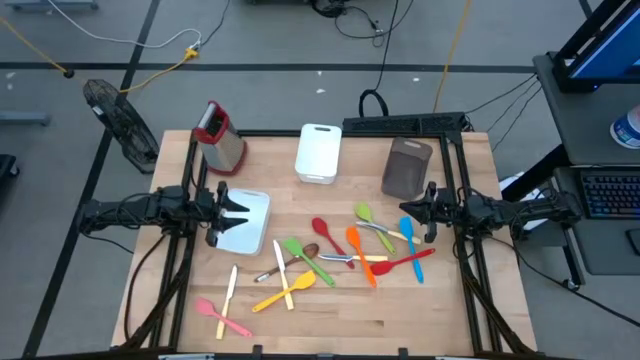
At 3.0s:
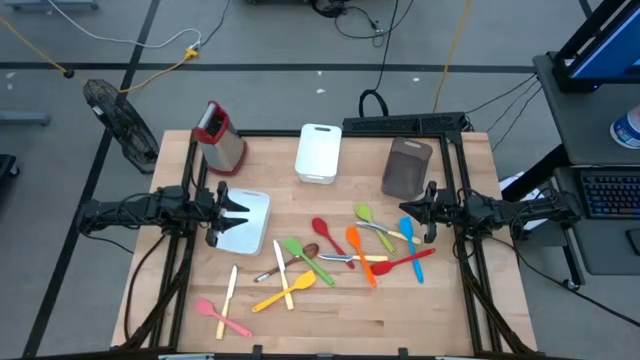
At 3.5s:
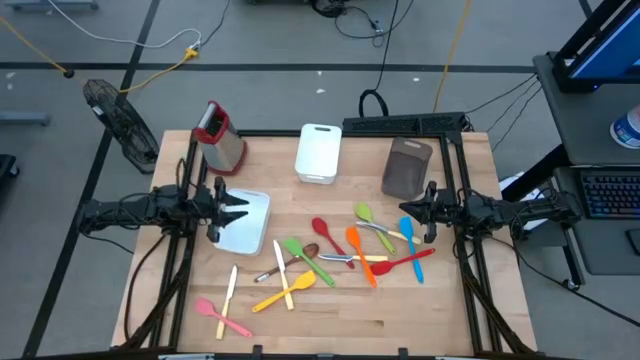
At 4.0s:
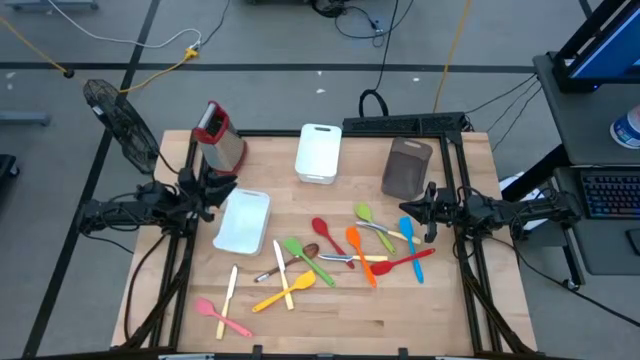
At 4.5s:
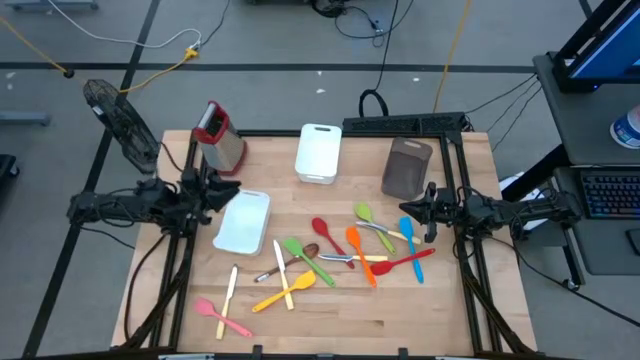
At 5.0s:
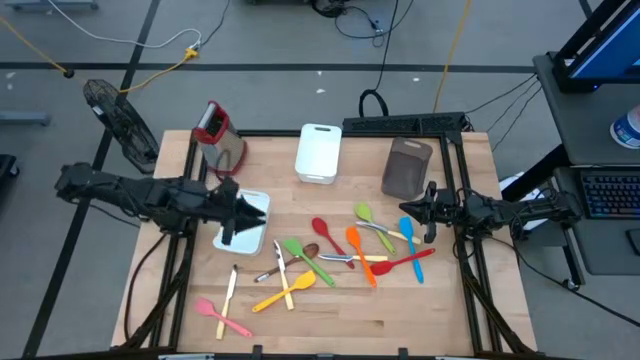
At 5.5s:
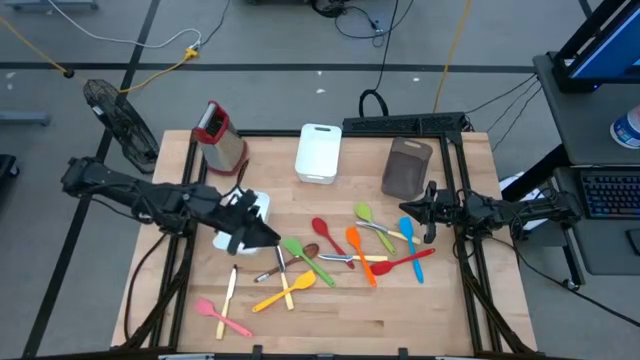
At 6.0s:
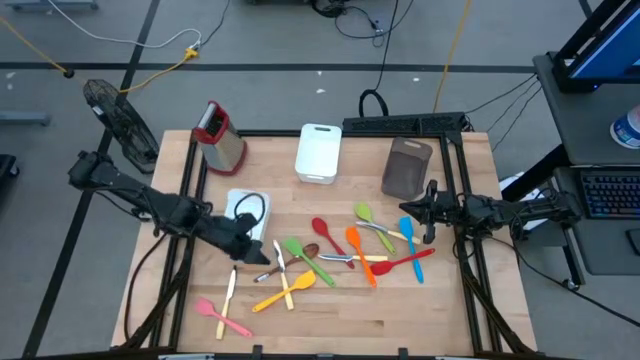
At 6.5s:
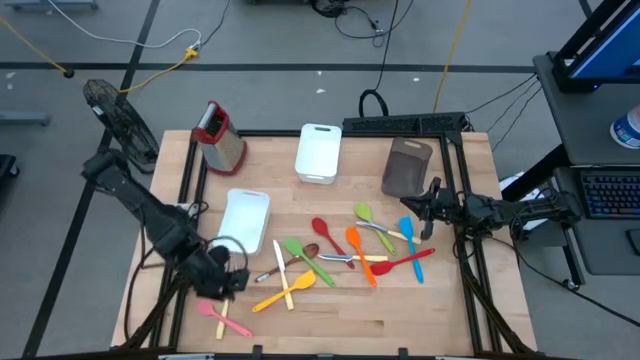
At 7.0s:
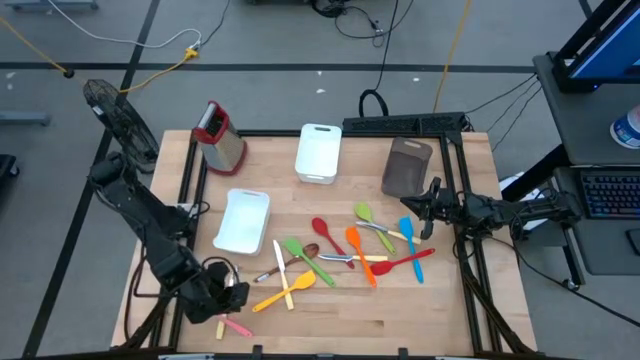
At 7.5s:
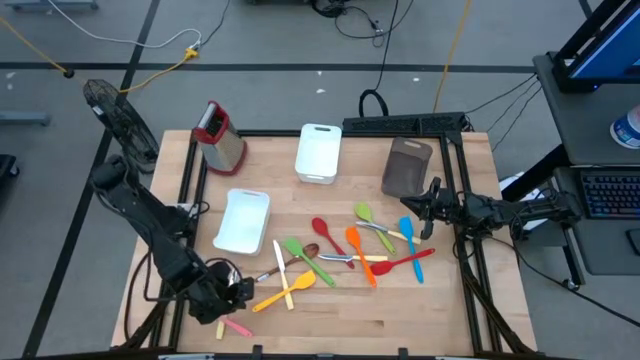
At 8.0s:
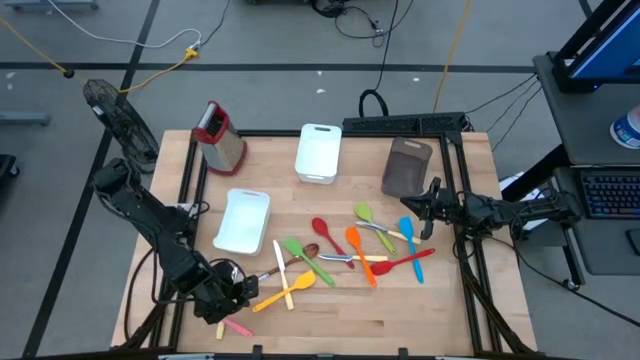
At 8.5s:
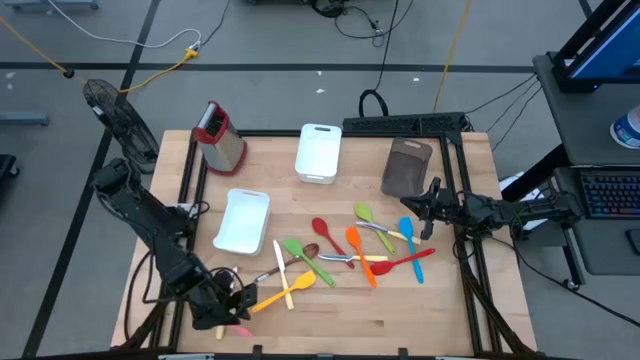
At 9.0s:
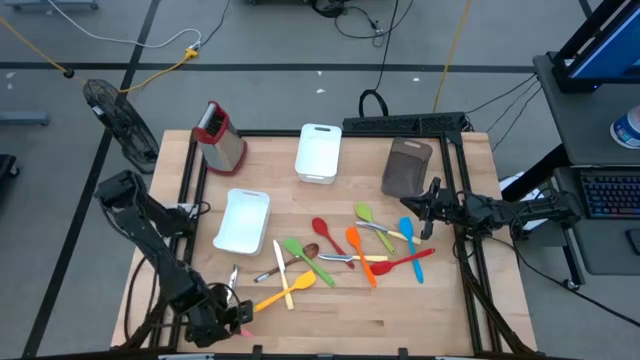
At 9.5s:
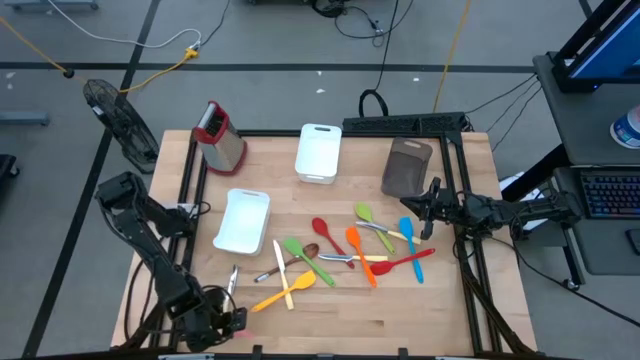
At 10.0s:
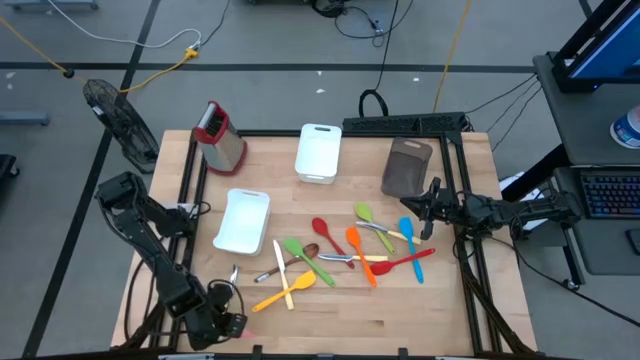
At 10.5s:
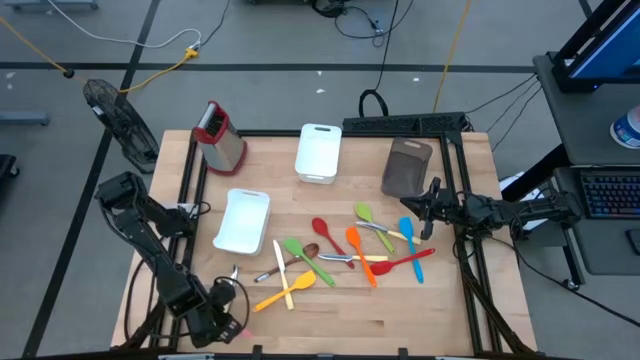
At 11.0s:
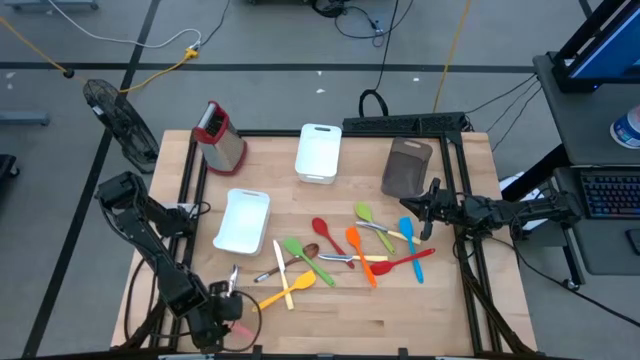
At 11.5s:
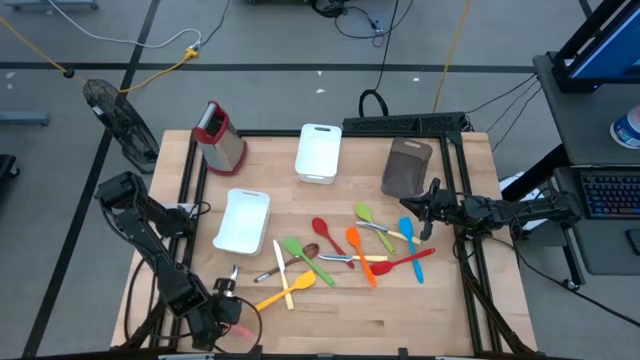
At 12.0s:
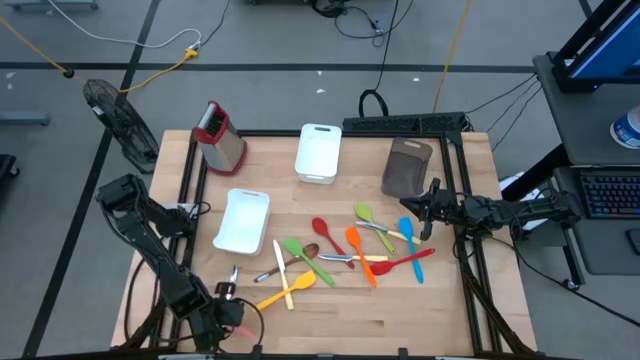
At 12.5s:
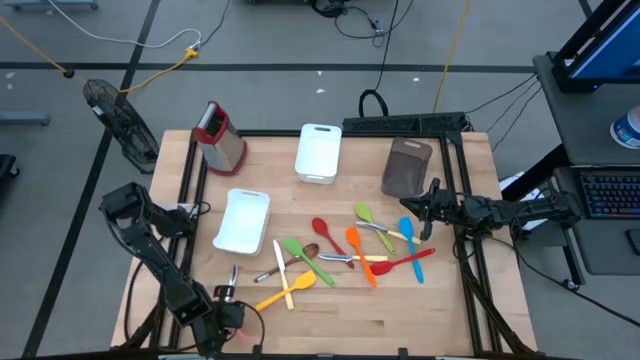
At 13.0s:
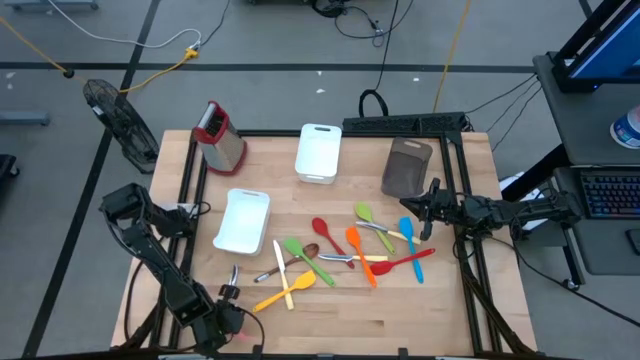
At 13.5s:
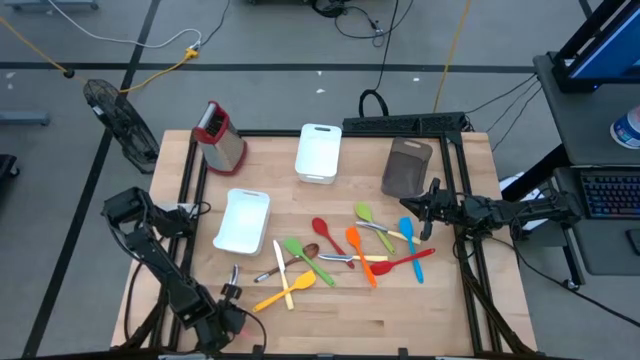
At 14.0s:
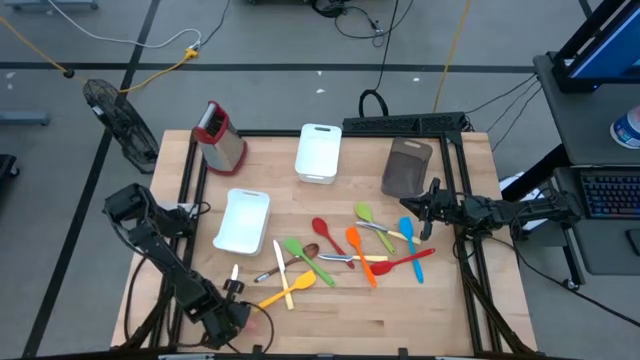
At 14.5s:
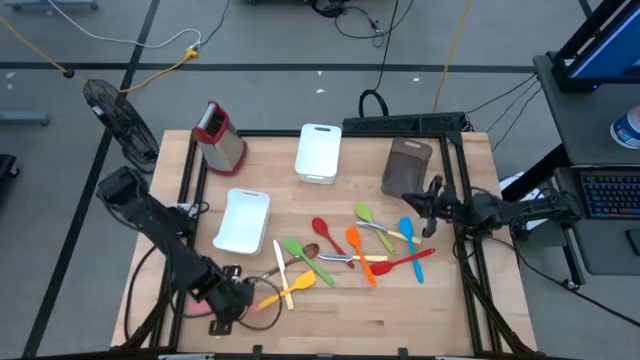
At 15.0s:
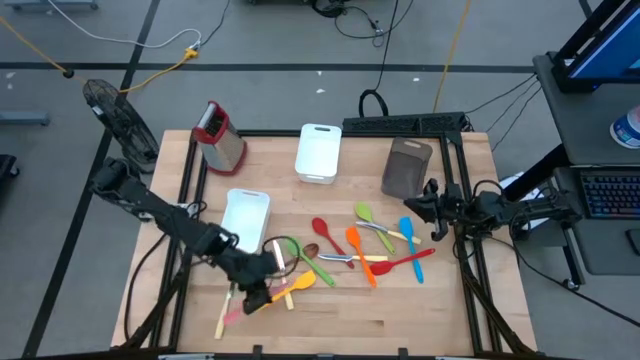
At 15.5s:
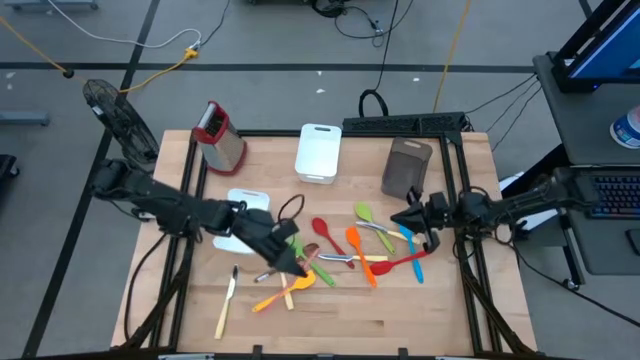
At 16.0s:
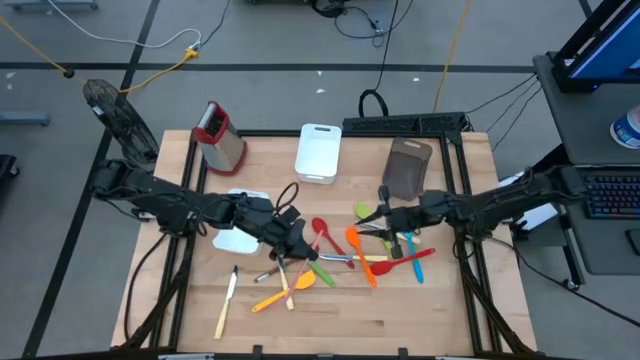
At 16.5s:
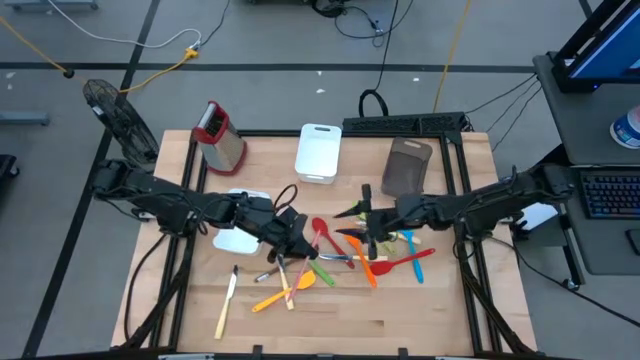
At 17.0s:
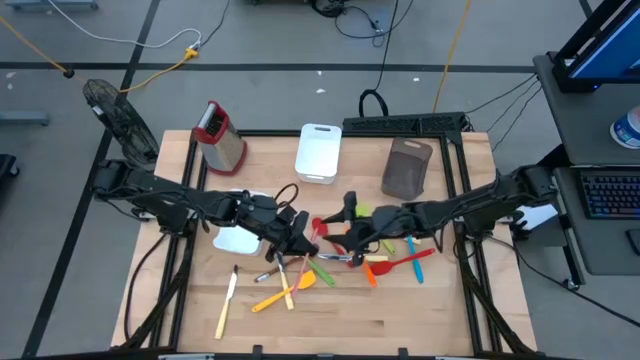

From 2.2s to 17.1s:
Task: Pick & Place Kitchen Items
Put the pink spatula into the black bin
